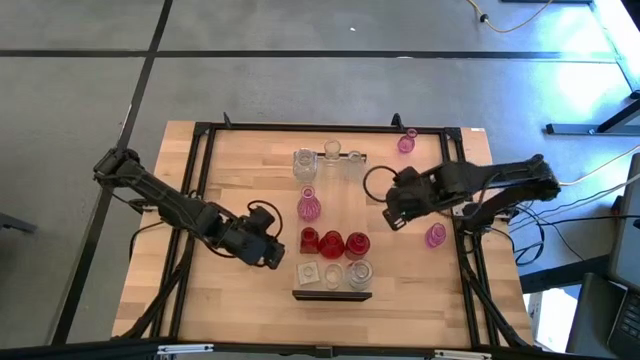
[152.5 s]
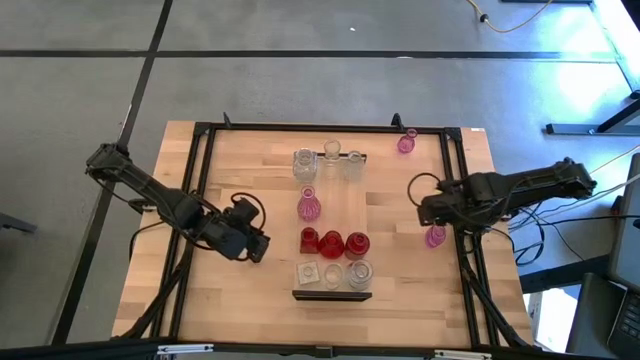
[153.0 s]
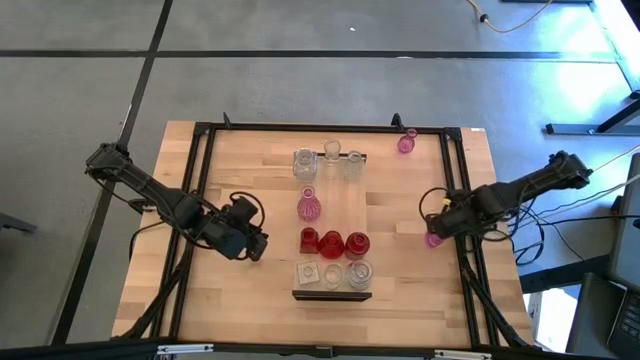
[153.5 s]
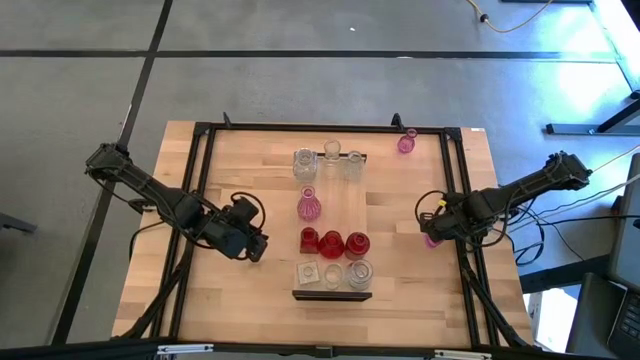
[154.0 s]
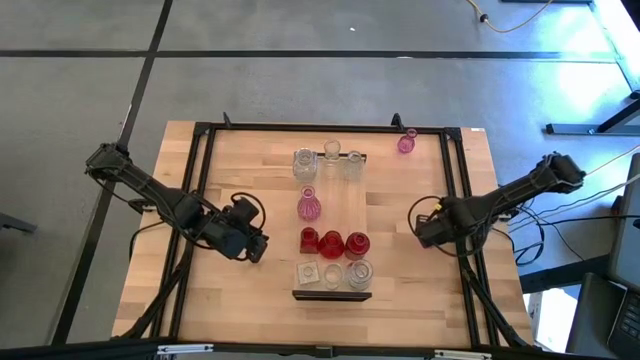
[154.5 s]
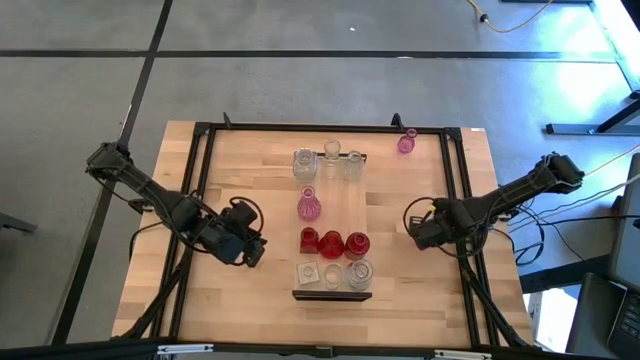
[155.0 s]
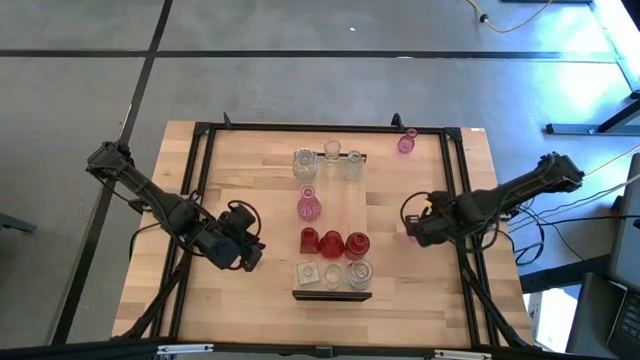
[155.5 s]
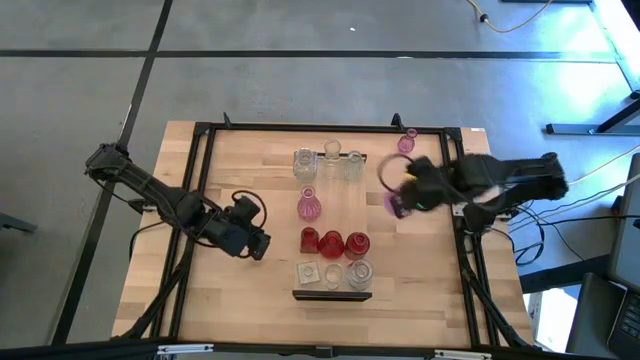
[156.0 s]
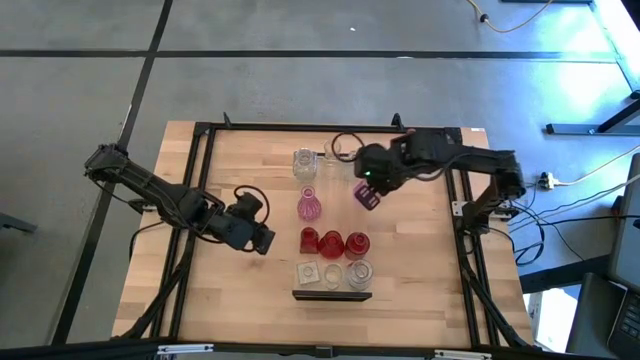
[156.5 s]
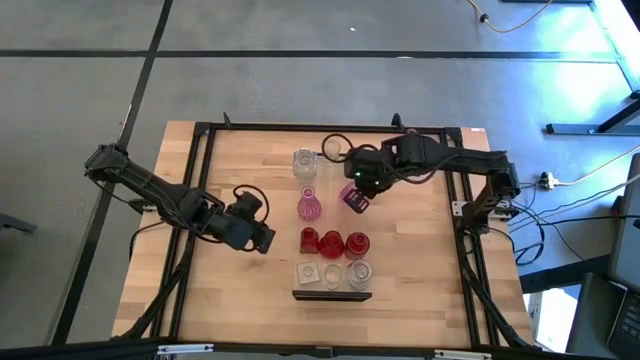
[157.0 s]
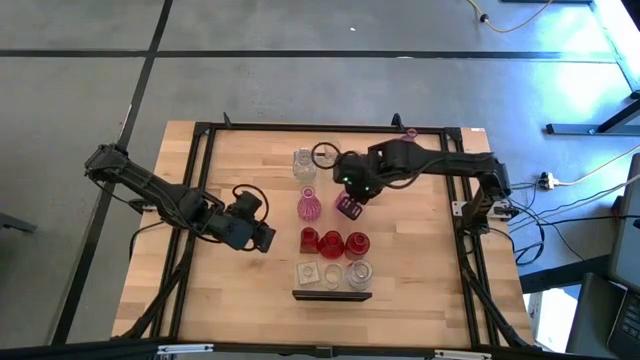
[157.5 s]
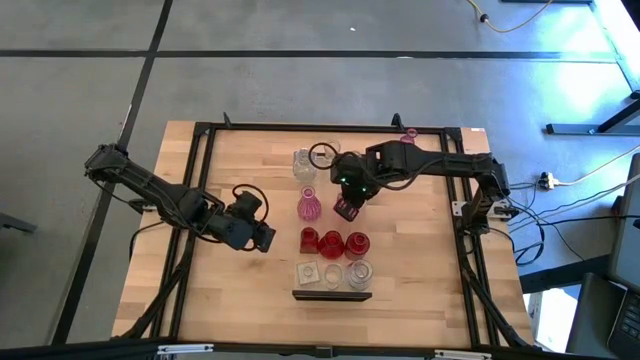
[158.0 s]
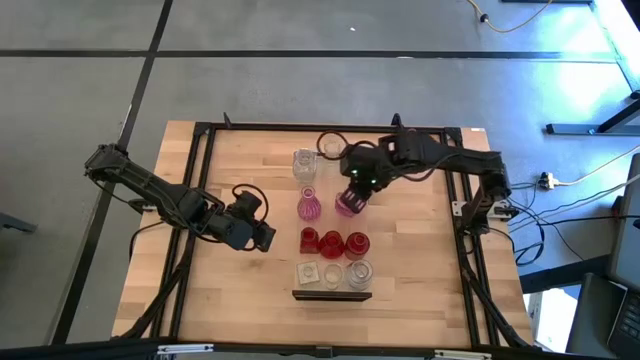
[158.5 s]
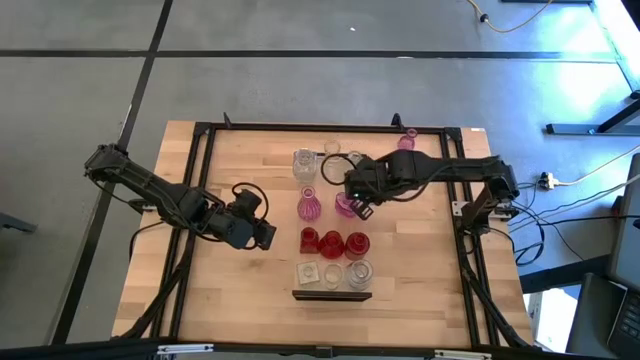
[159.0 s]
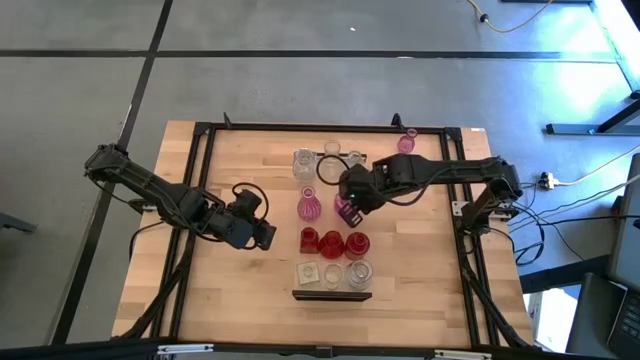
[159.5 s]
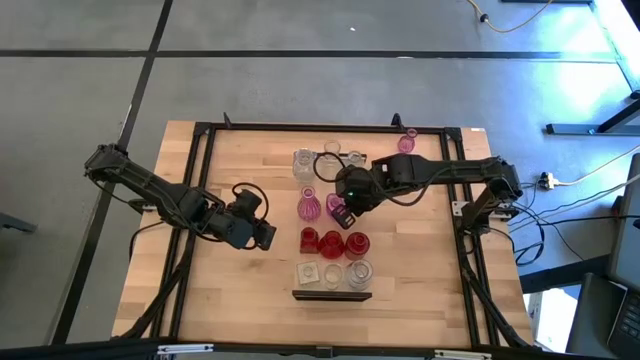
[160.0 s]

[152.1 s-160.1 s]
Task: sort vases onto shelf
Put the pink vase on the shelf aligned with the other pink vase

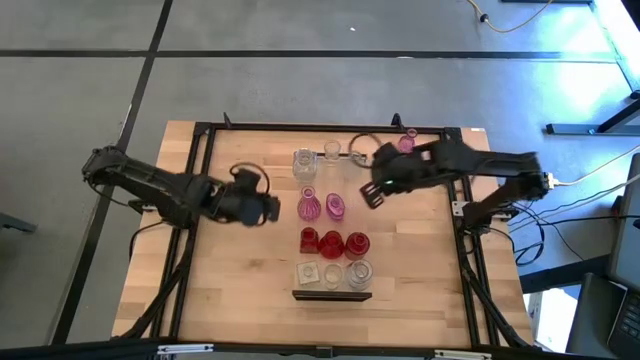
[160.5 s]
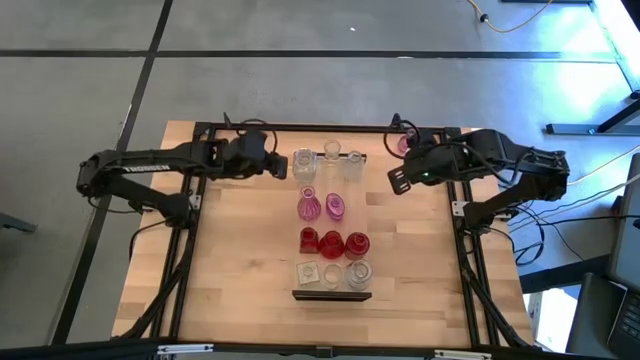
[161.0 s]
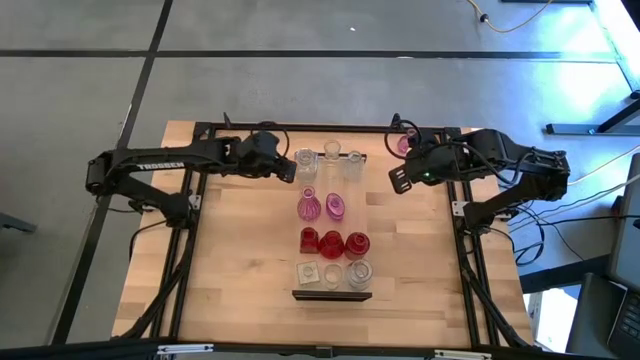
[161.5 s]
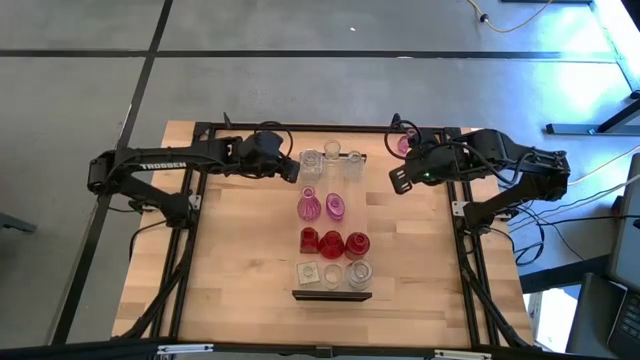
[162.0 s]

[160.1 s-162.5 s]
Adjust the transparent vase on top of the shelf

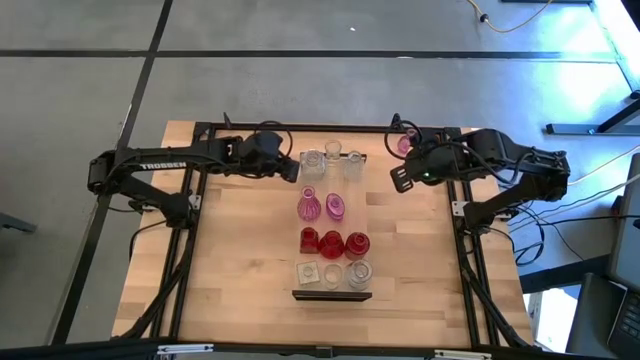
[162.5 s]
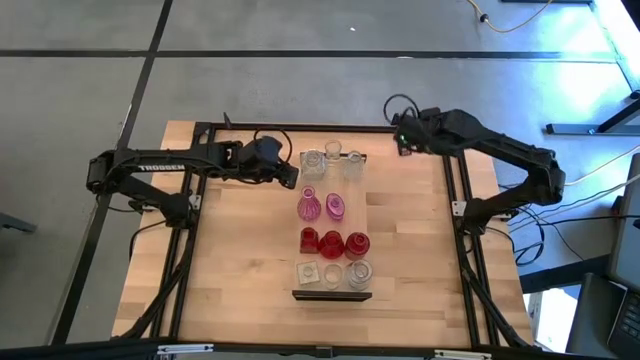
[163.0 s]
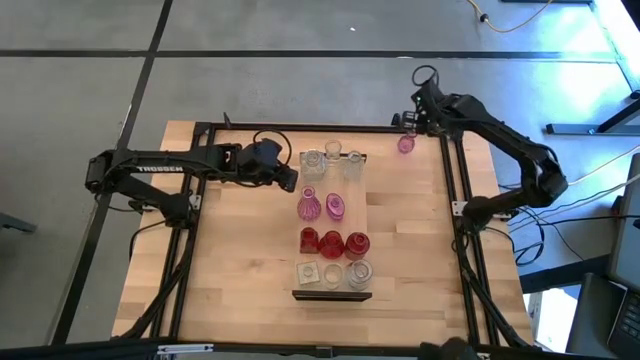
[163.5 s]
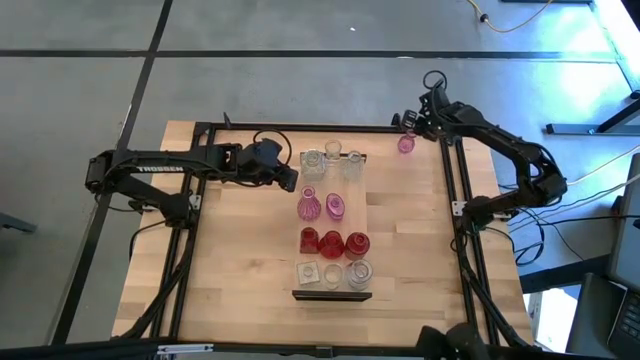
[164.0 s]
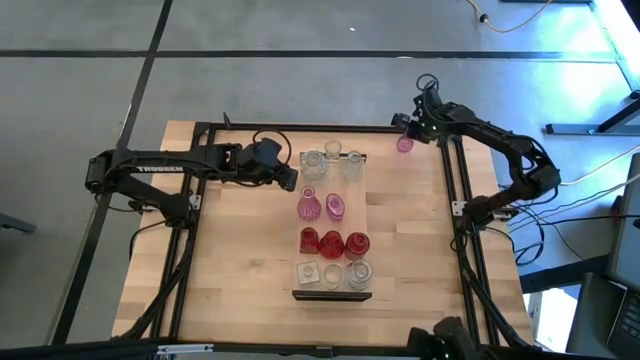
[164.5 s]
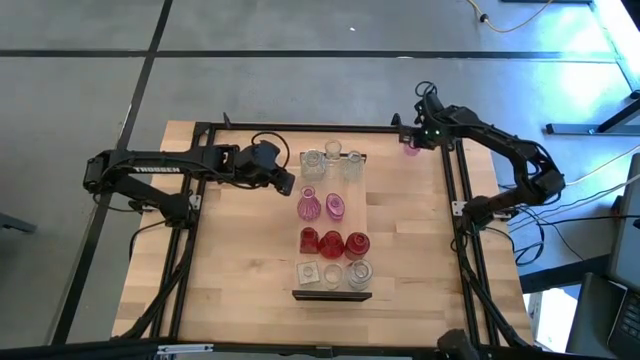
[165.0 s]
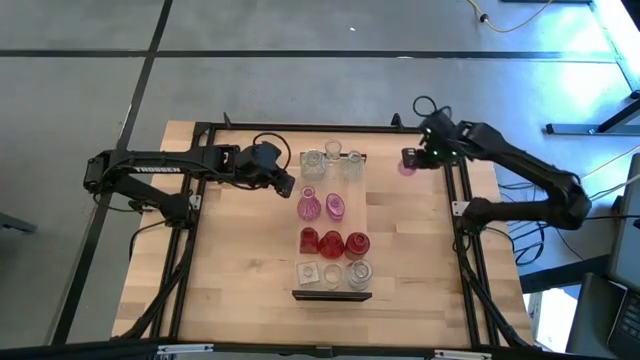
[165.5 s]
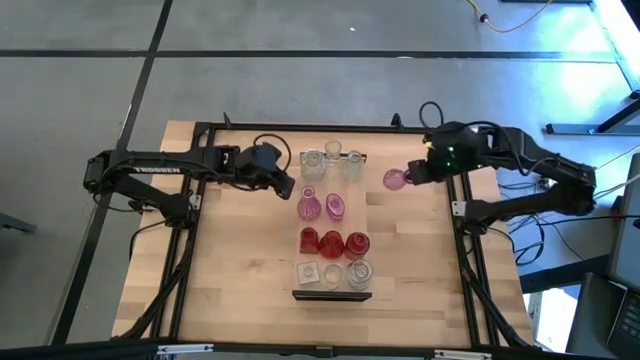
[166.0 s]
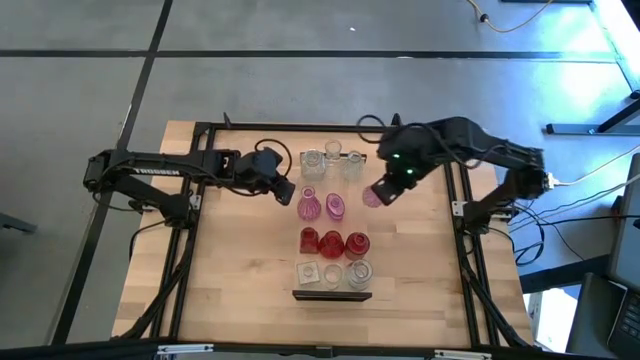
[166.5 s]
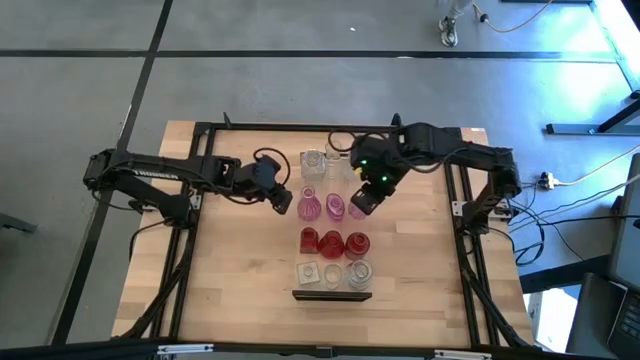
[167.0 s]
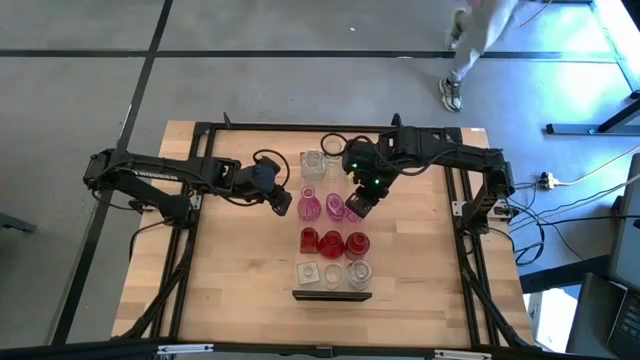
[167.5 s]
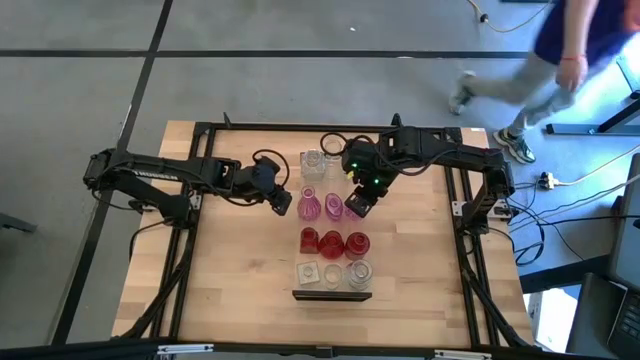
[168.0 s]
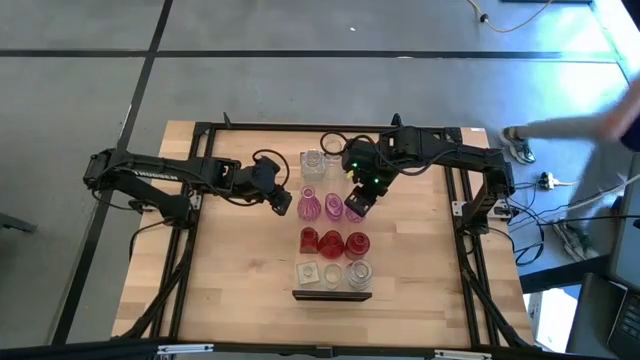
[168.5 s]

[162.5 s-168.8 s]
Put the pink vase on the shelf aligned with the other pink vases

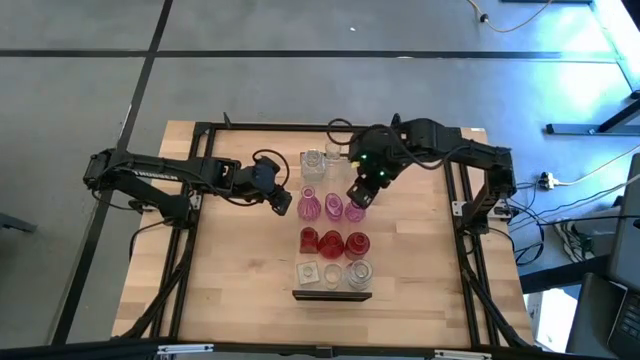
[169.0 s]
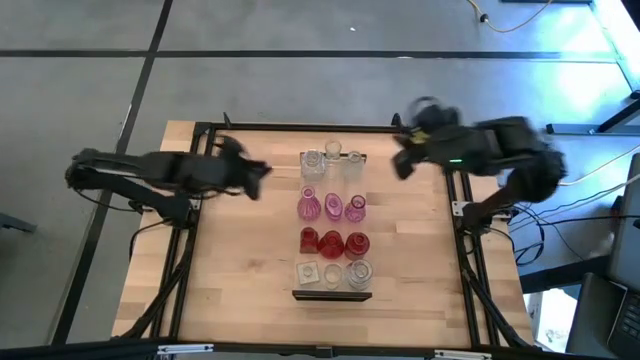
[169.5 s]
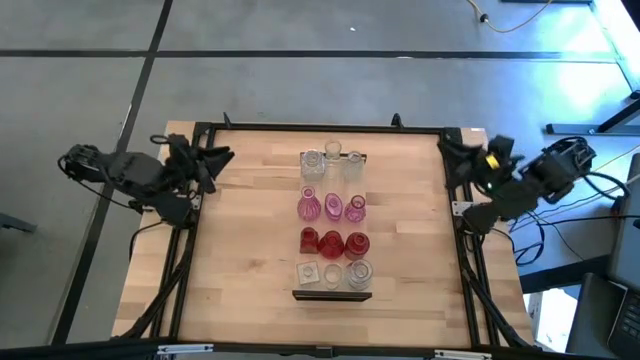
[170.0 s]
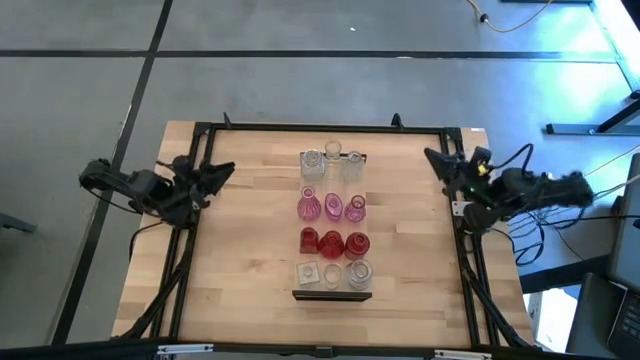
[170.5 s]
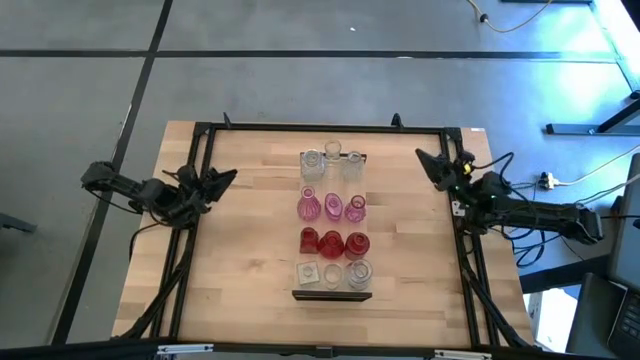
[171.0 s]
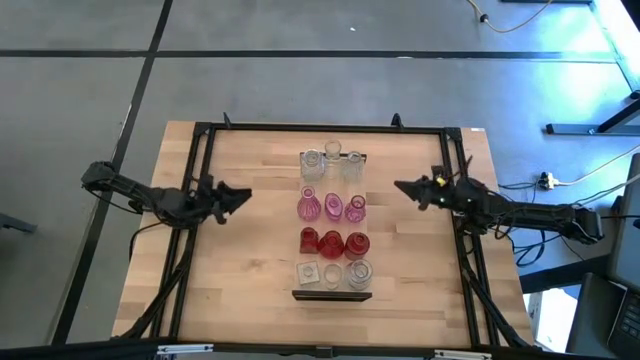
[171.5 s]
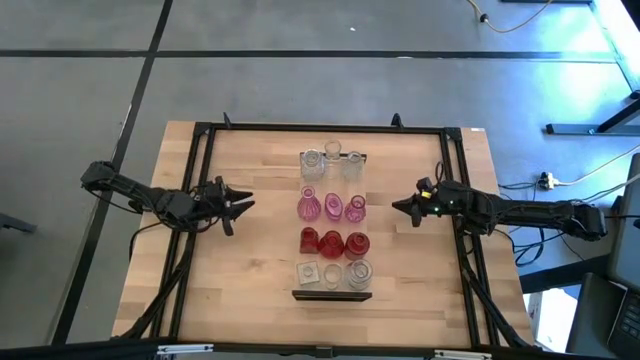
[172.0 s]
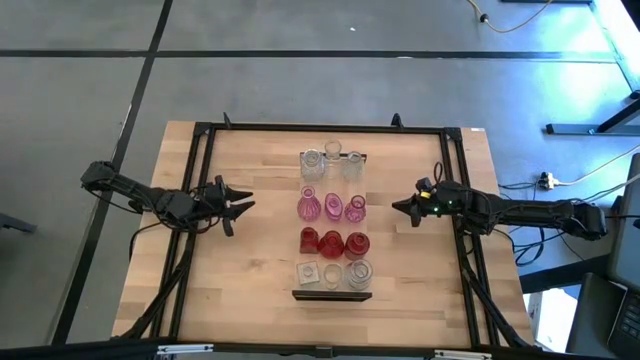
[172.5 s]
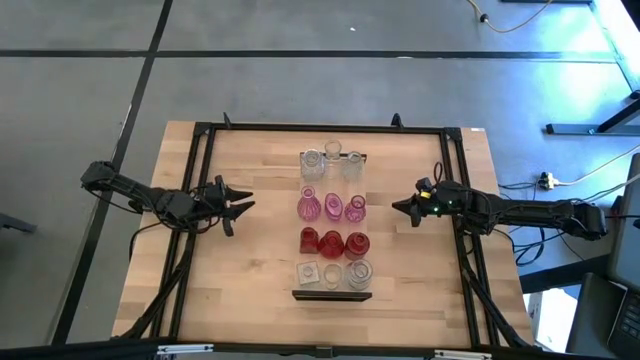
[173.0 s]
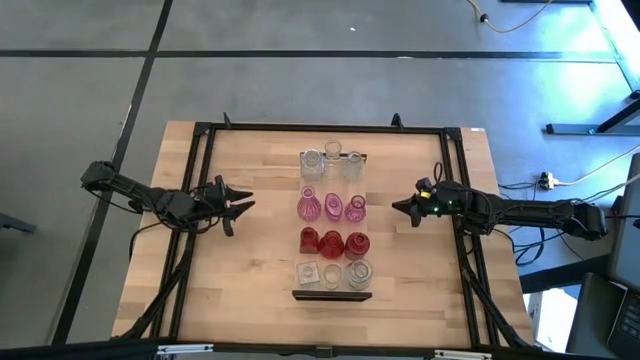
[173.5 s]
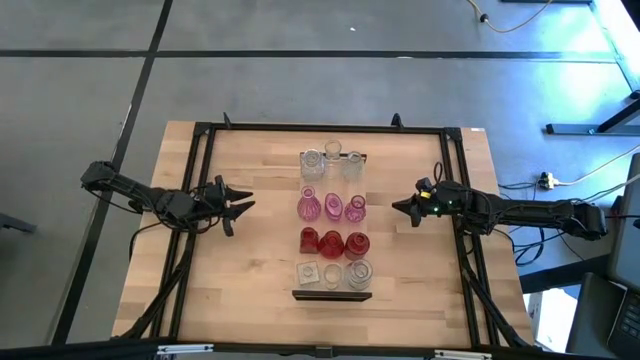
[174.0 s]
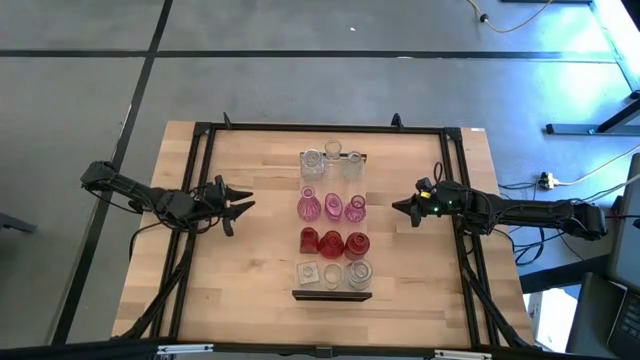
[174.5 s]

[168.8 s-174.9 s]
Return to Home Position
